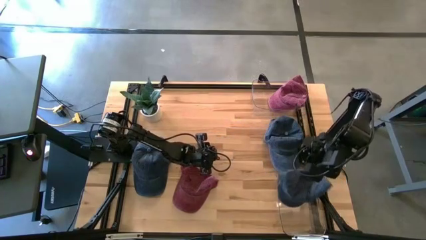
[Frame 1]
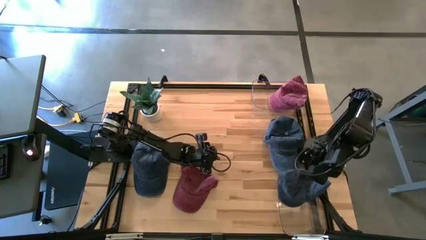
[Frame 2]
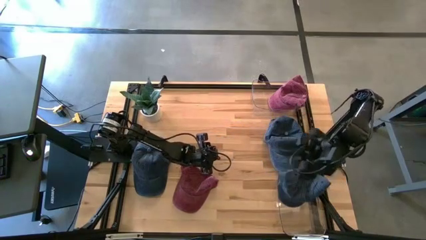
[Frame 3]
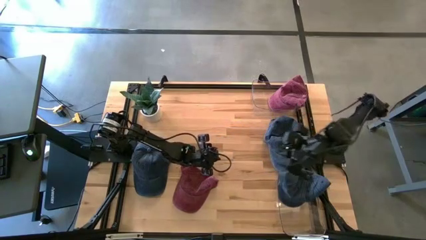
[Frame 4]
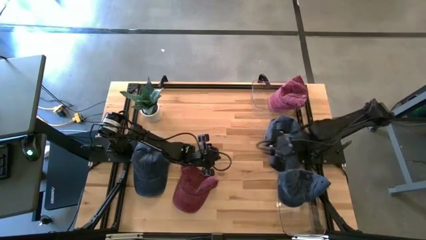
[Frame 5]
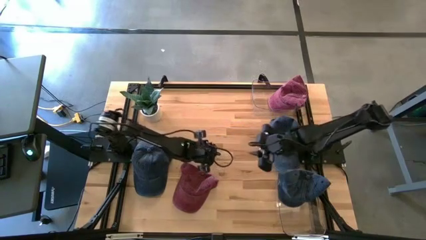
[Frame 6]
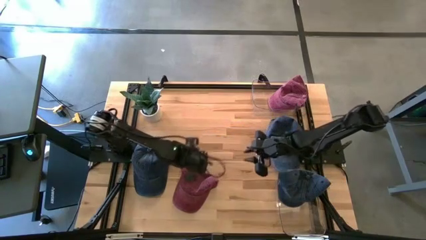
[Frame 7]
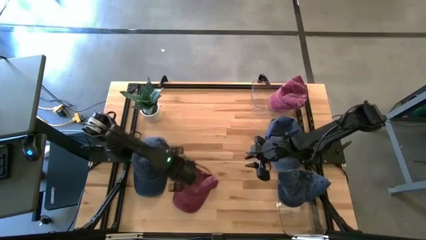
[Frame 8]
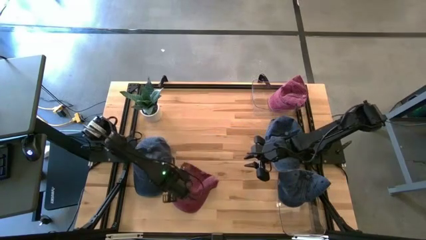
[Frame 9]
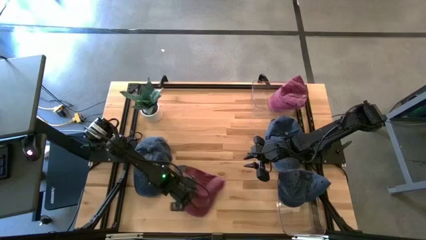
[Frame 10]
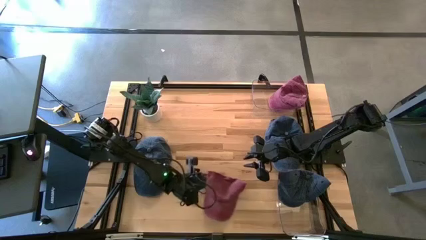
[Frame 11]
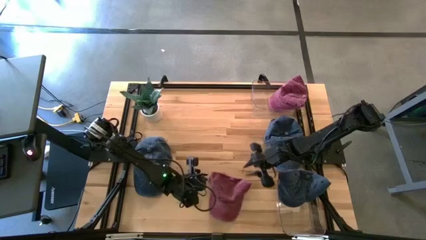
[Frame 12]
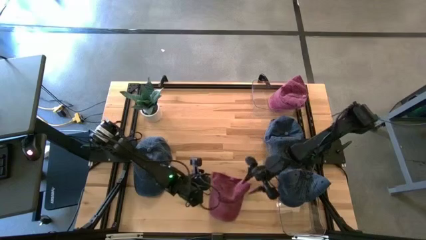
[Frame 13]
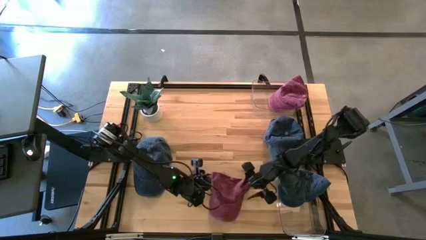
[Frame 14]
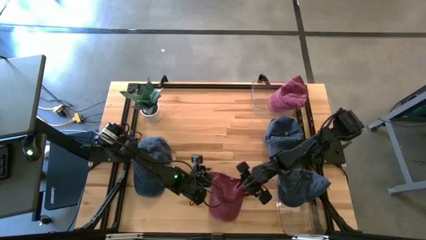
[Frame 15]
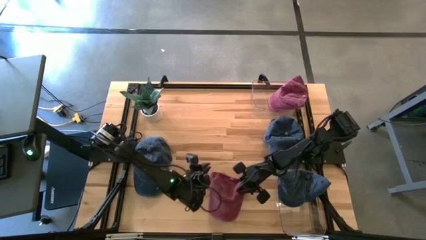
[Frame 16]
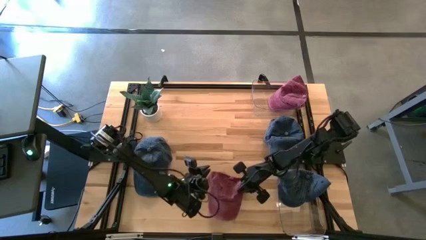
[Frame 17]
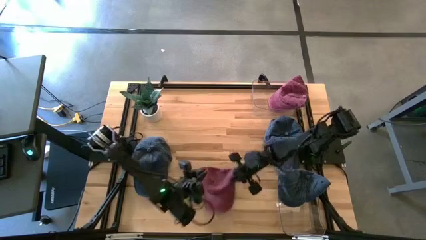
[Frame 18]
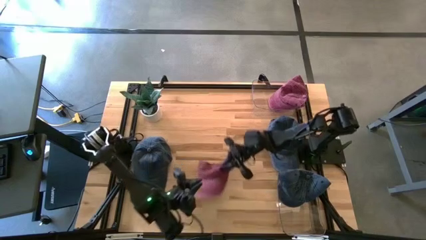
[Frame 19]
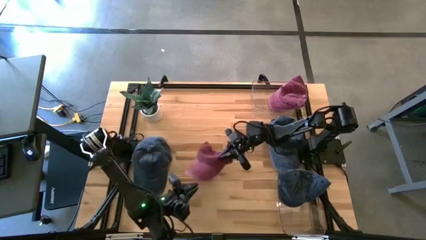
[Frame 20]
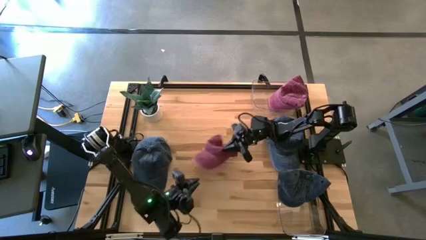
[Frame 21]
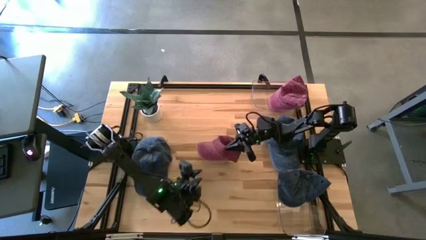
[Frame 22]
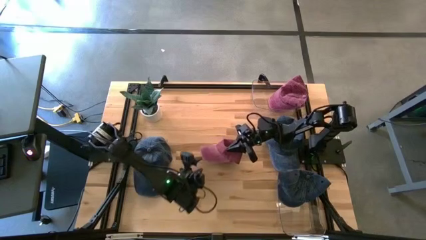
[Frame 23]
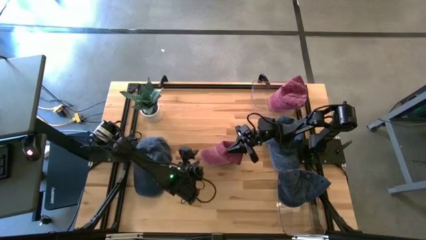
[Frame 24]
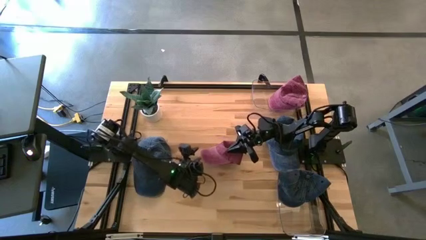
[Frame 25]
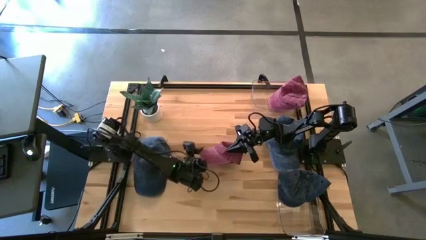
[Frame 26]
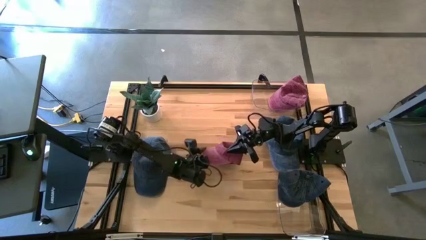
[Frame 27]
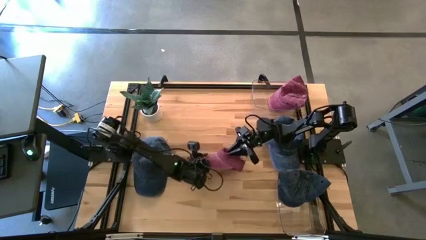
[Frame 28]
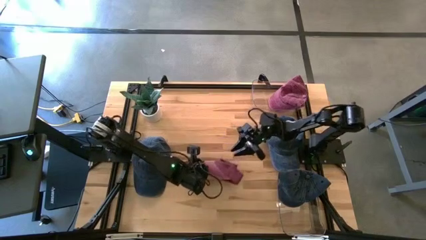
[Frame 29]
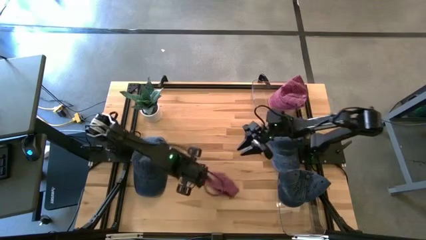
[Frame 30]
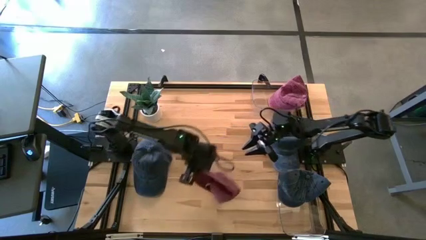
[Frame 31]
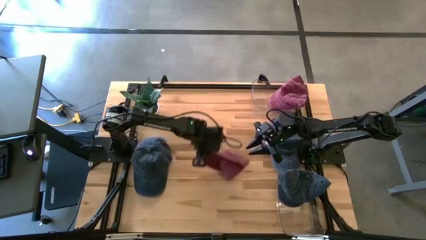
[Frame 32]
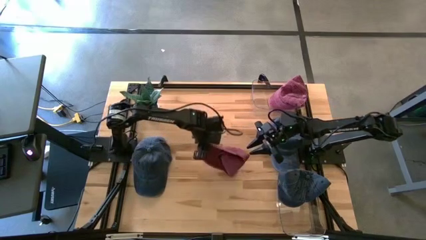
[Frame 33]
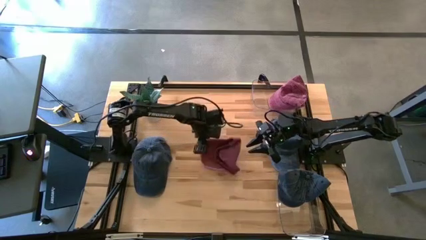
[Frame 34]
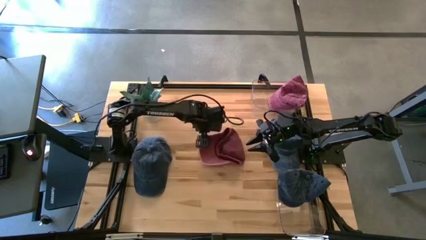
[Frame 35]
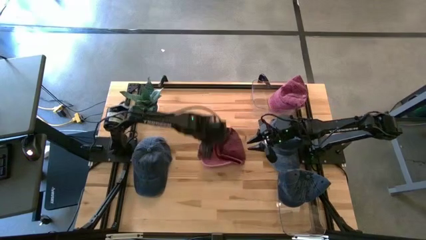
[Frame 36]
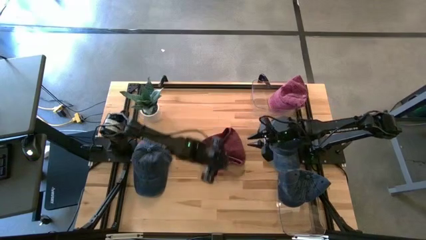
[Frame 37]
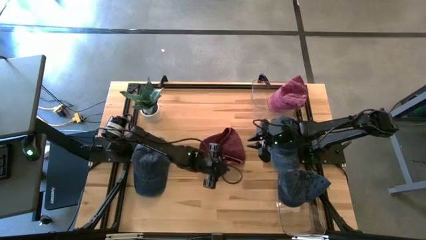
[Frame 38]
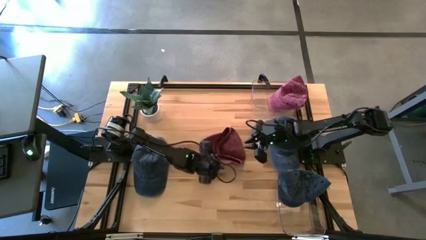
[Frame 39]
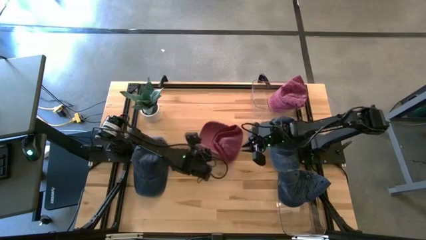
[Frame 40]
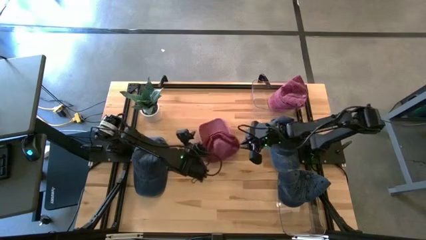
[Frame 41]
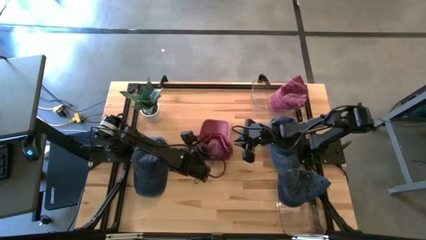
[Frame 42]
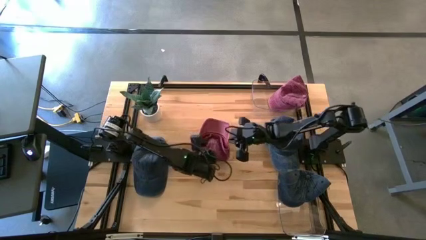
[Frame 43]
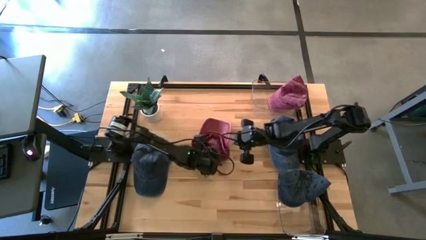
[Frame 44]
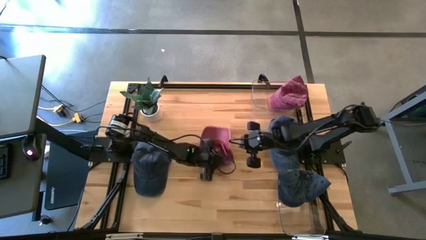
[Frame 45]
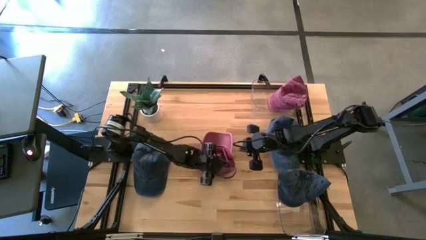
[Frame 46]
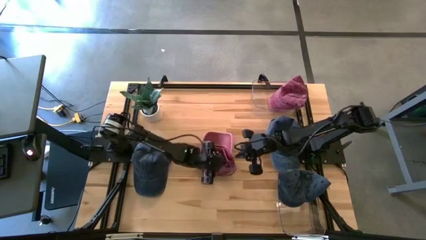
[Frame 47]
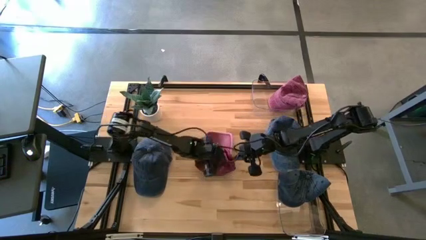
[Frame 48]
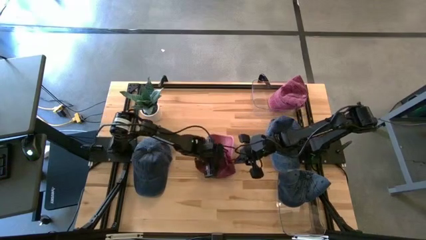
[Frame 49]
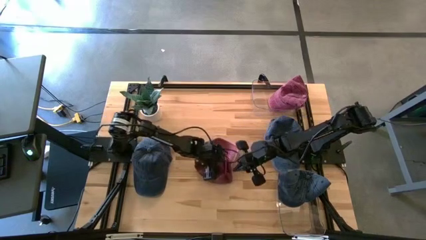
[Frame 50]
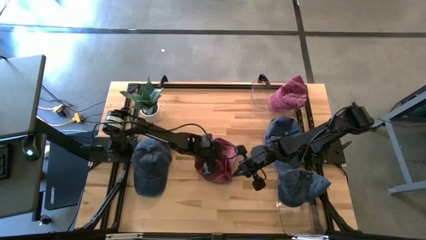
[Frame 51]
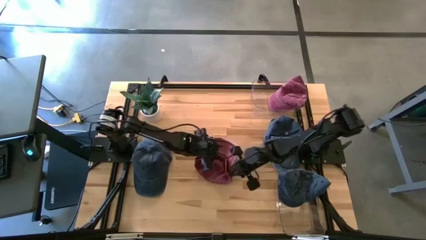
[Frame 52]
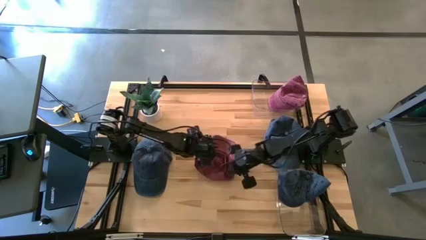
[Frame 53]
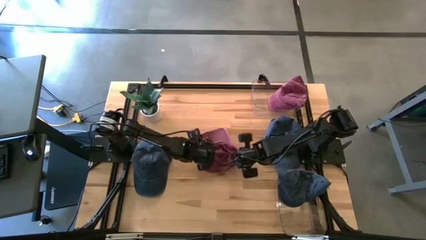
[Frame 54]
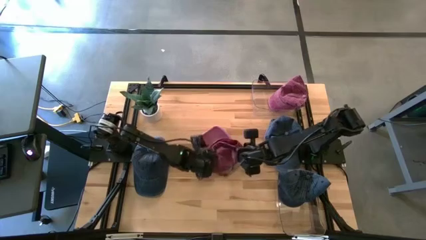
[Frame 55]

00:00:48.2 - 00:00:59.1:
Task: Pick & Place hat
Put the red cap into the top transparent bin
